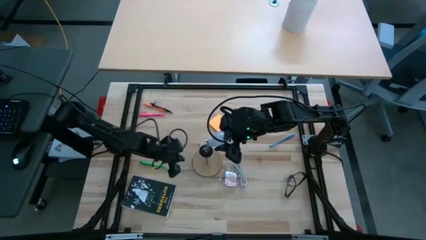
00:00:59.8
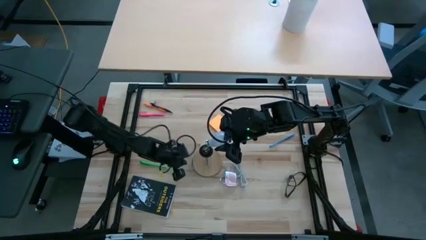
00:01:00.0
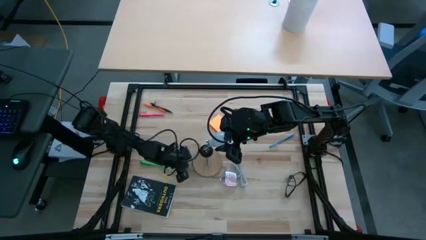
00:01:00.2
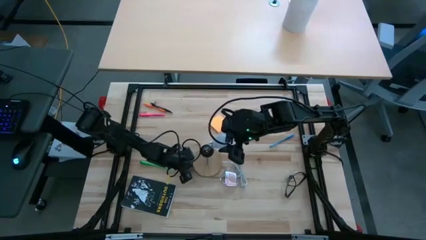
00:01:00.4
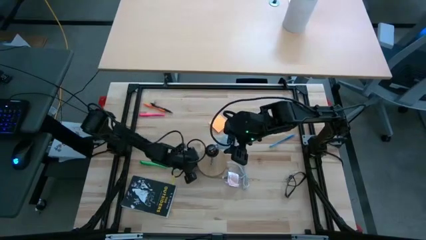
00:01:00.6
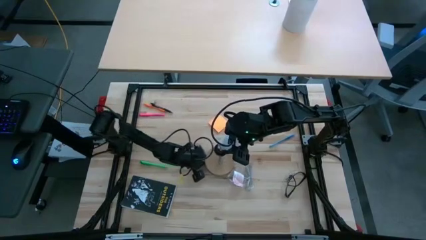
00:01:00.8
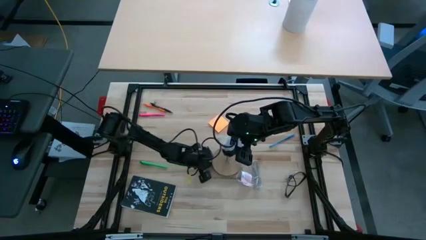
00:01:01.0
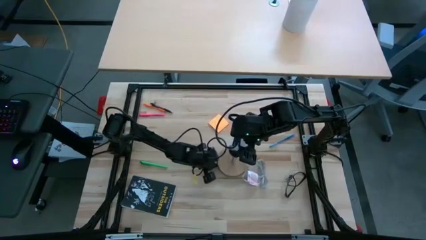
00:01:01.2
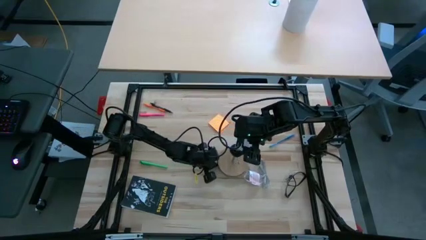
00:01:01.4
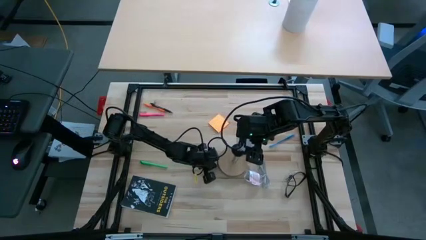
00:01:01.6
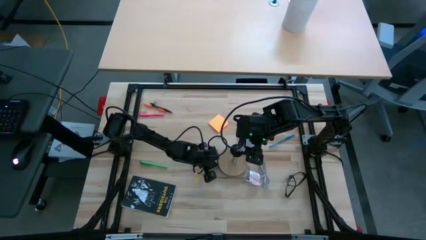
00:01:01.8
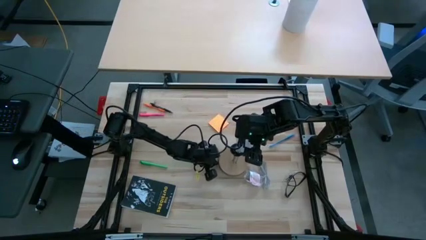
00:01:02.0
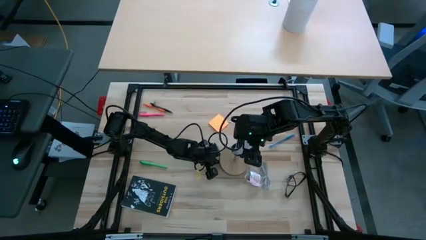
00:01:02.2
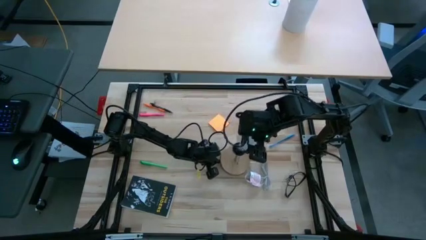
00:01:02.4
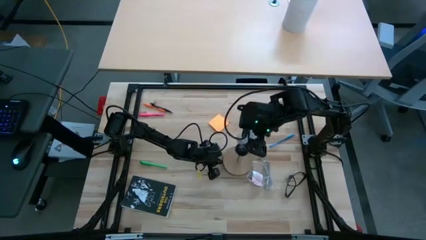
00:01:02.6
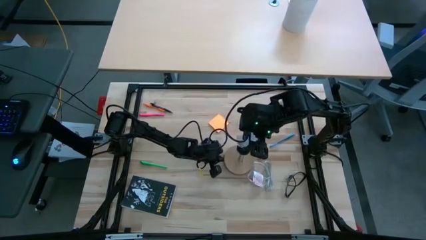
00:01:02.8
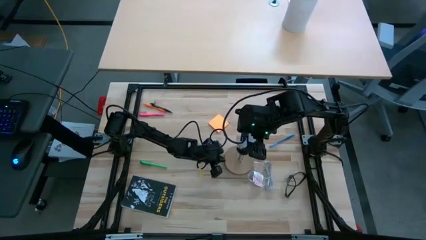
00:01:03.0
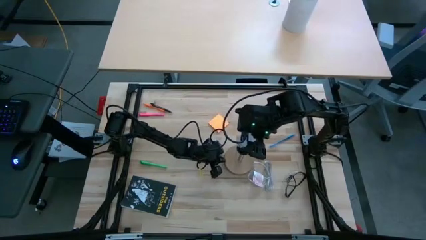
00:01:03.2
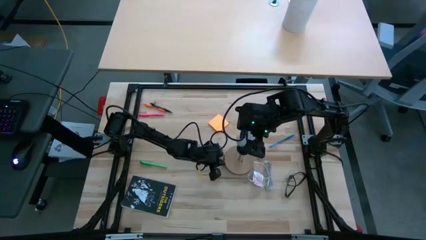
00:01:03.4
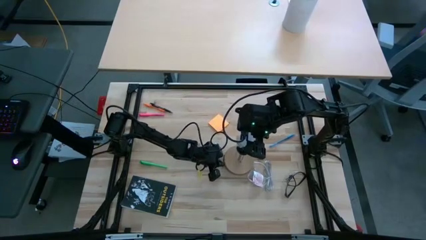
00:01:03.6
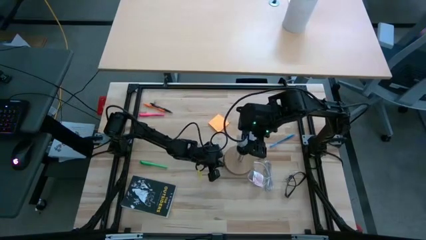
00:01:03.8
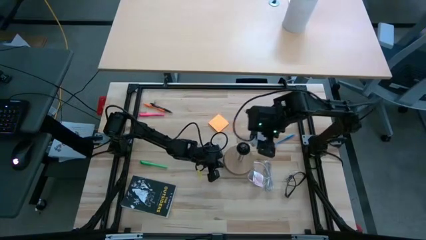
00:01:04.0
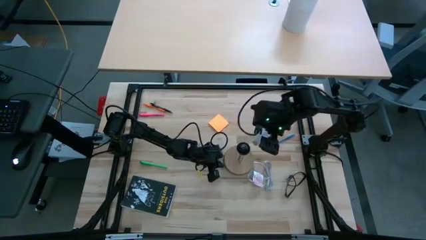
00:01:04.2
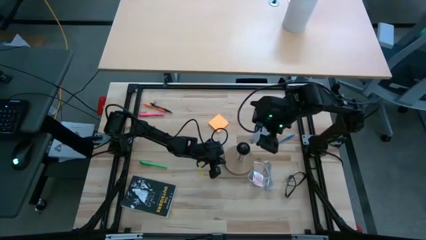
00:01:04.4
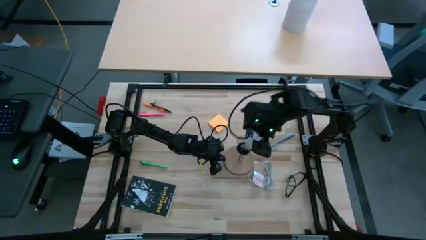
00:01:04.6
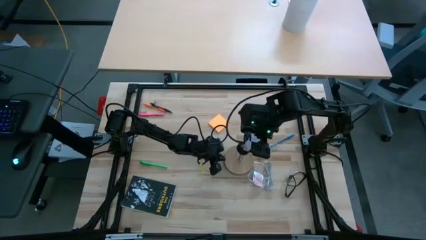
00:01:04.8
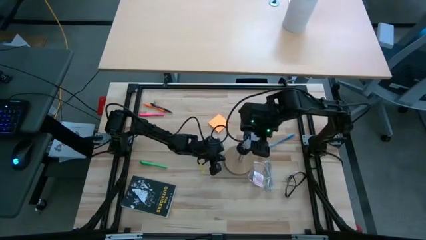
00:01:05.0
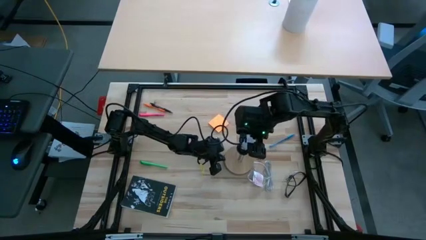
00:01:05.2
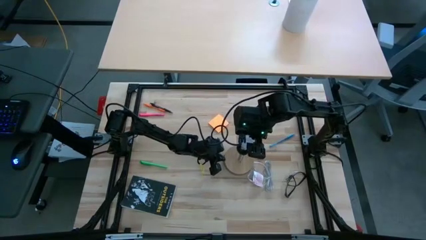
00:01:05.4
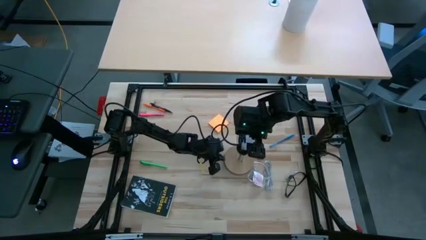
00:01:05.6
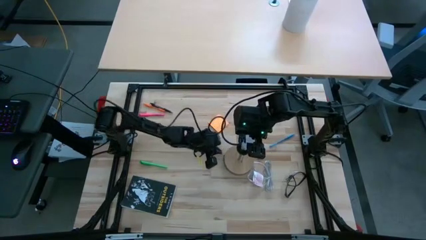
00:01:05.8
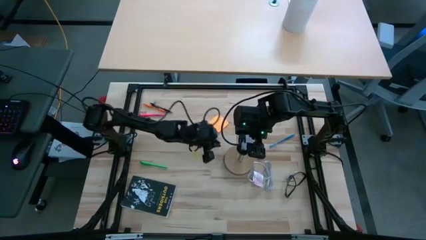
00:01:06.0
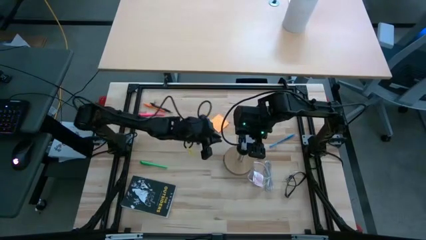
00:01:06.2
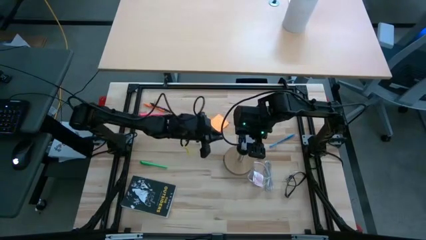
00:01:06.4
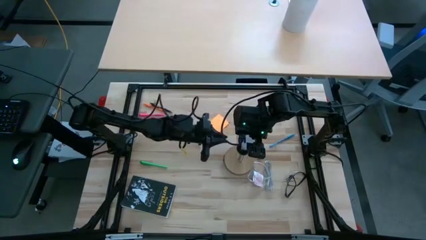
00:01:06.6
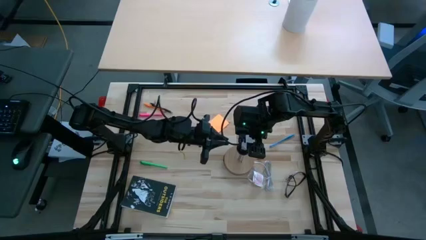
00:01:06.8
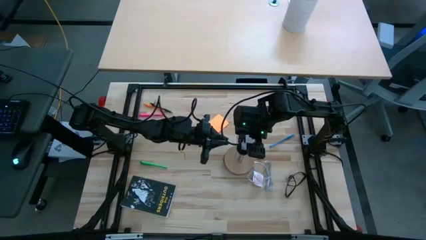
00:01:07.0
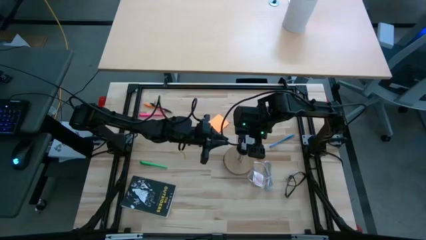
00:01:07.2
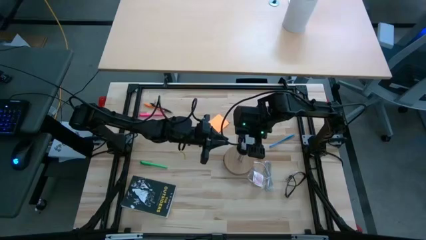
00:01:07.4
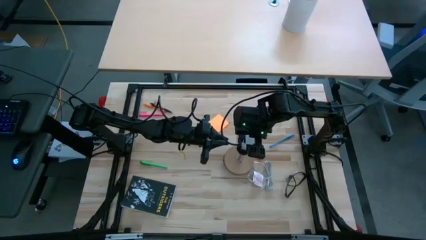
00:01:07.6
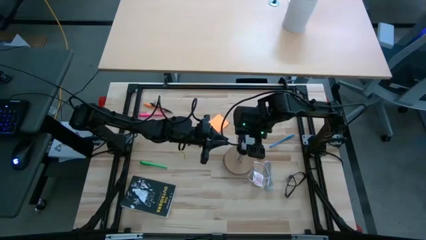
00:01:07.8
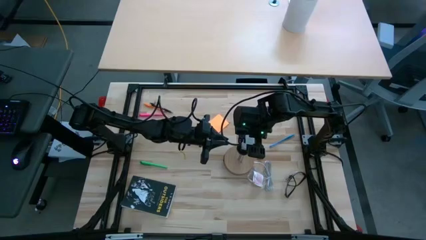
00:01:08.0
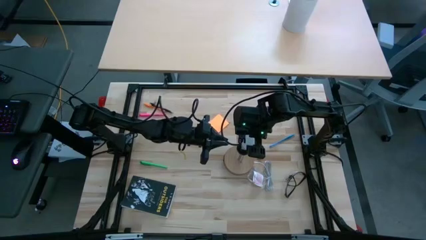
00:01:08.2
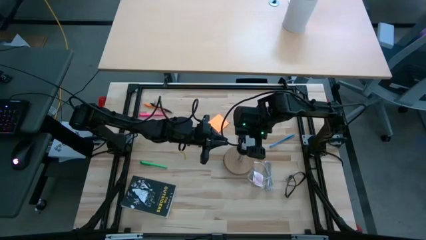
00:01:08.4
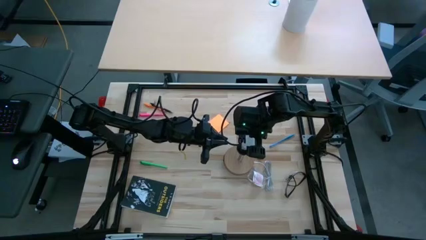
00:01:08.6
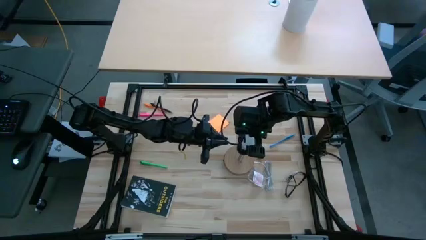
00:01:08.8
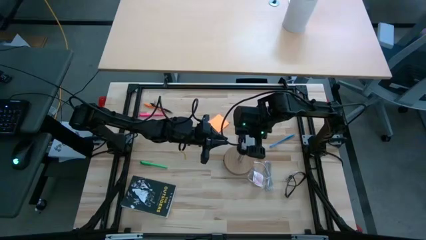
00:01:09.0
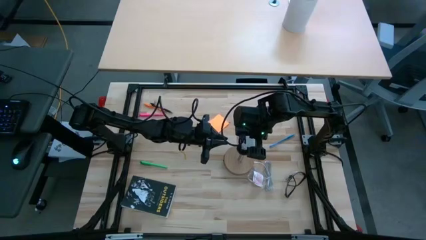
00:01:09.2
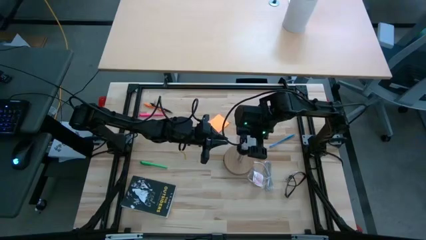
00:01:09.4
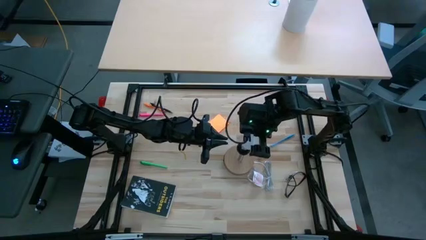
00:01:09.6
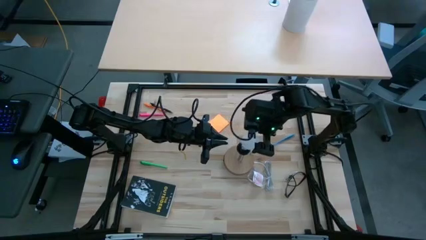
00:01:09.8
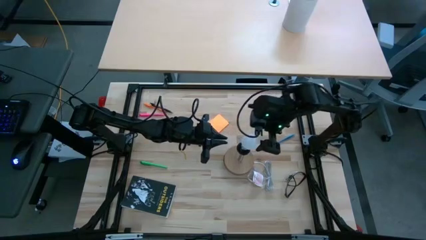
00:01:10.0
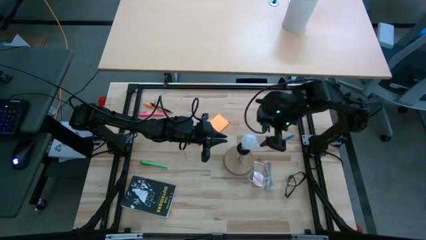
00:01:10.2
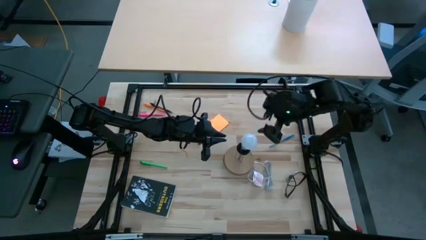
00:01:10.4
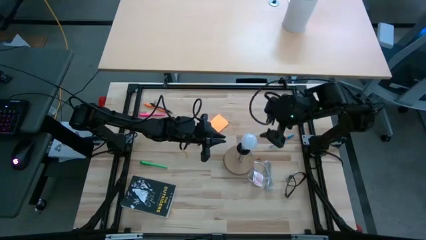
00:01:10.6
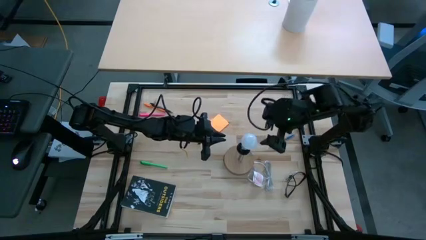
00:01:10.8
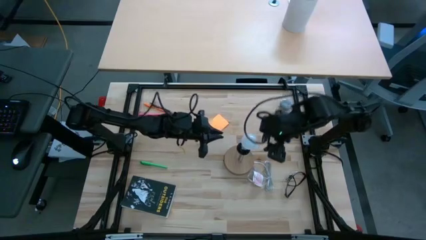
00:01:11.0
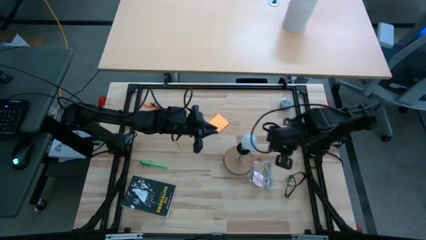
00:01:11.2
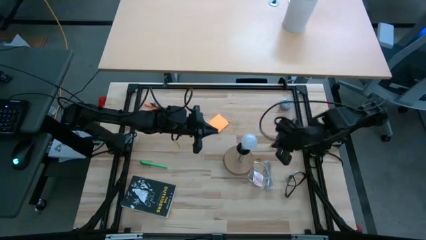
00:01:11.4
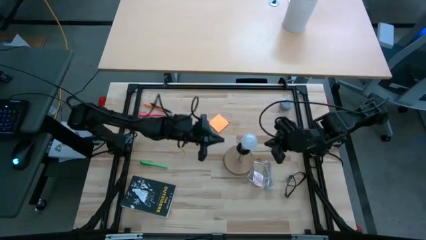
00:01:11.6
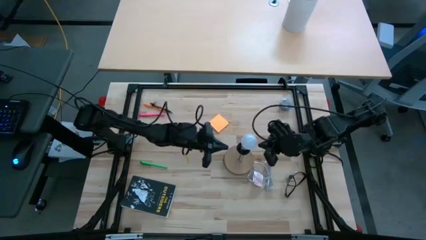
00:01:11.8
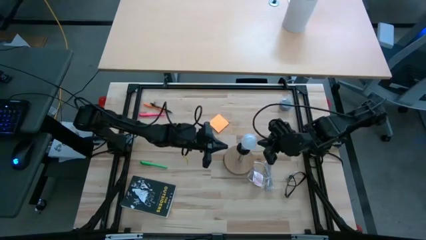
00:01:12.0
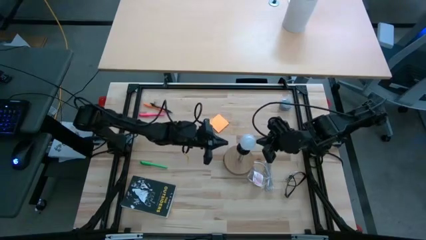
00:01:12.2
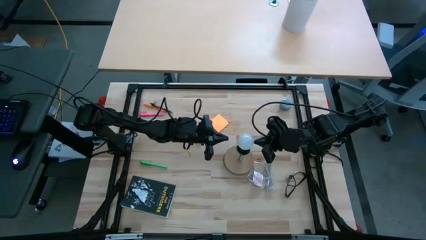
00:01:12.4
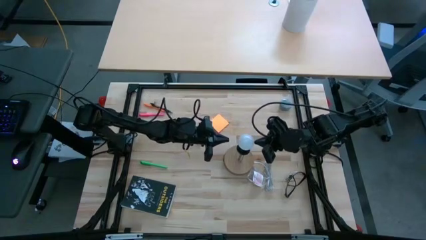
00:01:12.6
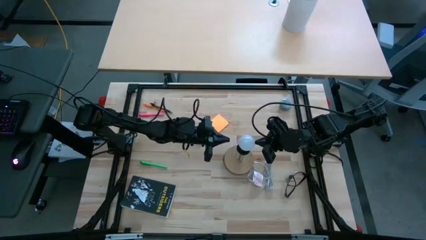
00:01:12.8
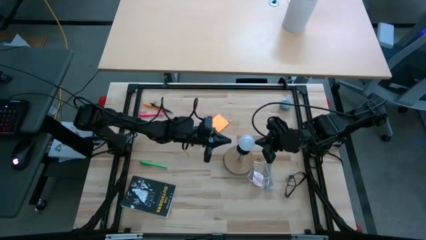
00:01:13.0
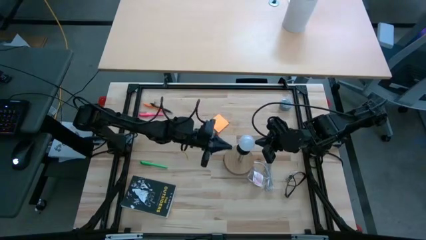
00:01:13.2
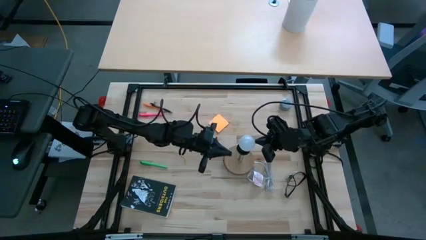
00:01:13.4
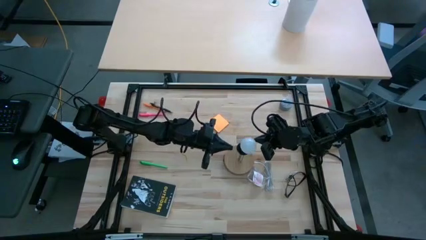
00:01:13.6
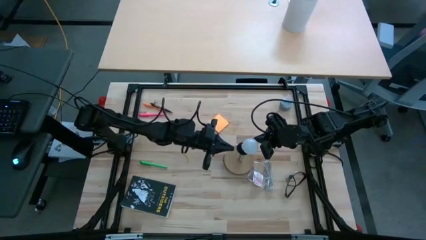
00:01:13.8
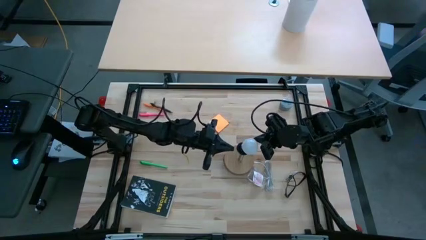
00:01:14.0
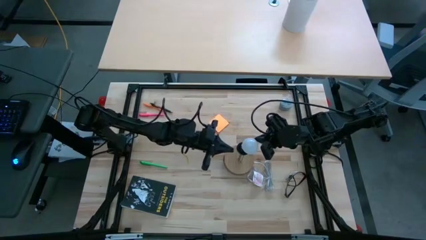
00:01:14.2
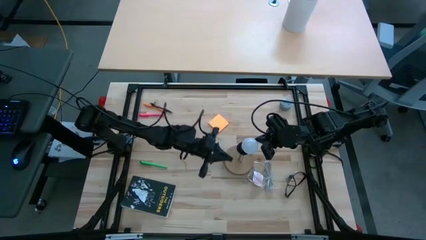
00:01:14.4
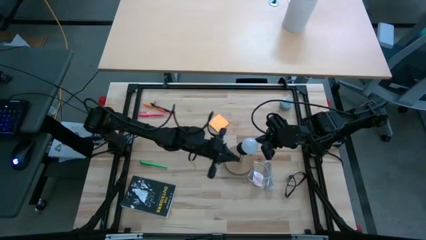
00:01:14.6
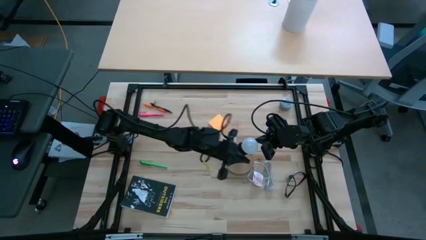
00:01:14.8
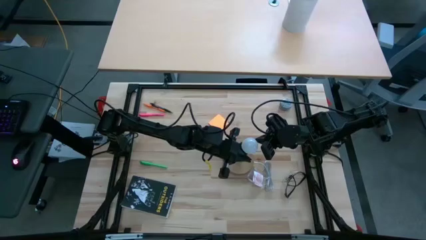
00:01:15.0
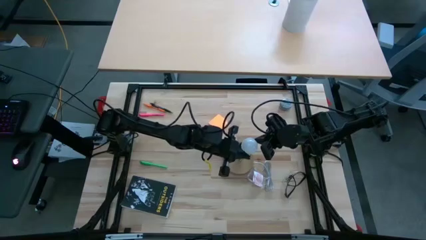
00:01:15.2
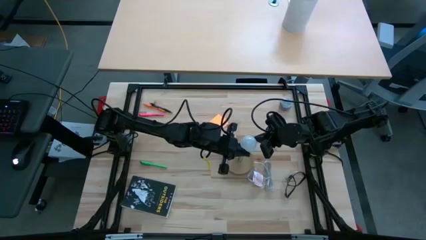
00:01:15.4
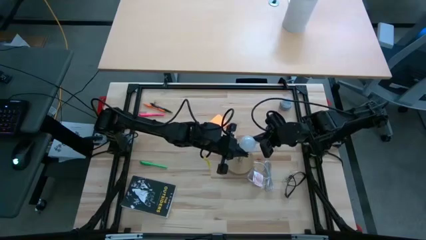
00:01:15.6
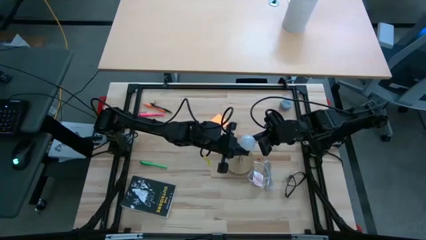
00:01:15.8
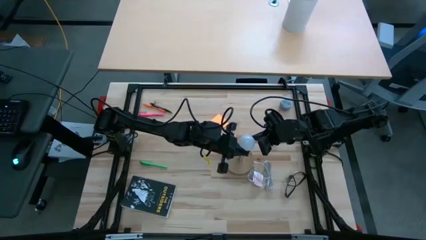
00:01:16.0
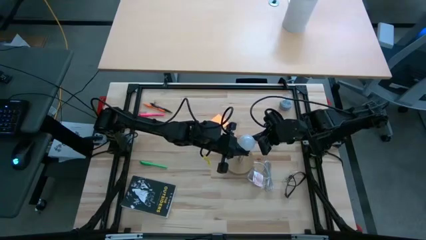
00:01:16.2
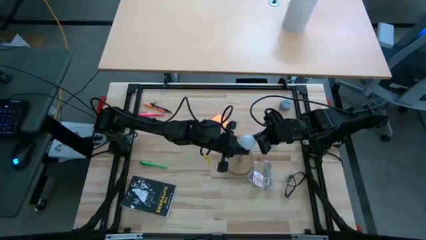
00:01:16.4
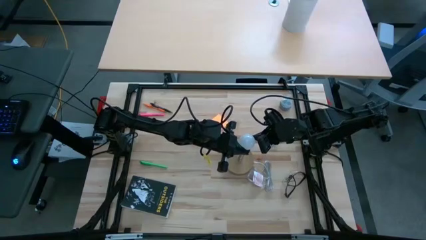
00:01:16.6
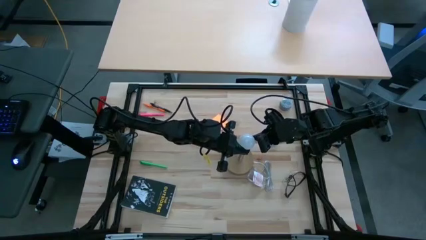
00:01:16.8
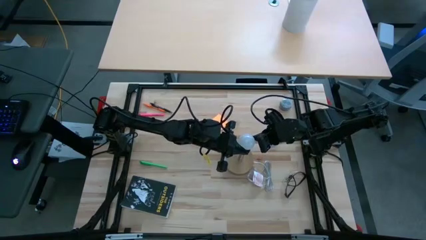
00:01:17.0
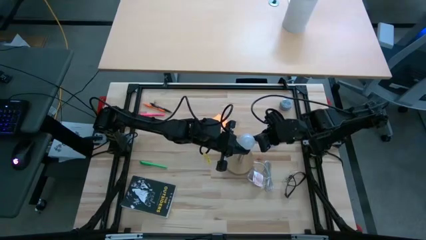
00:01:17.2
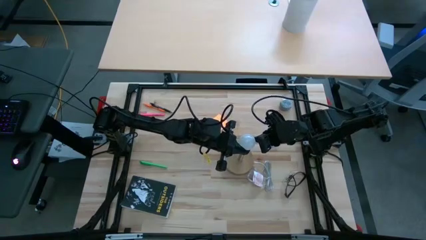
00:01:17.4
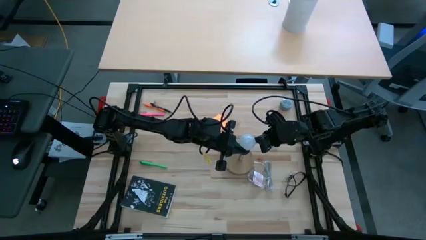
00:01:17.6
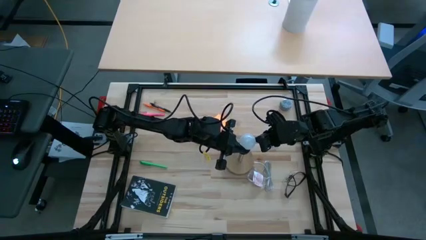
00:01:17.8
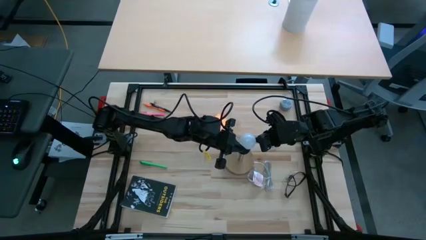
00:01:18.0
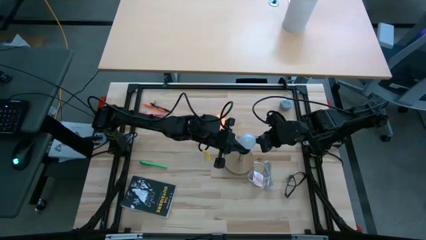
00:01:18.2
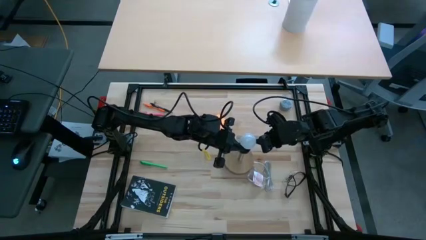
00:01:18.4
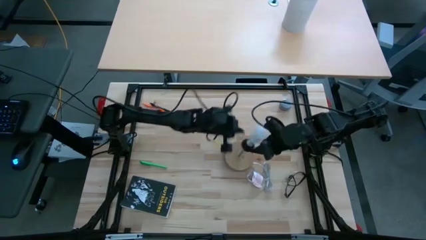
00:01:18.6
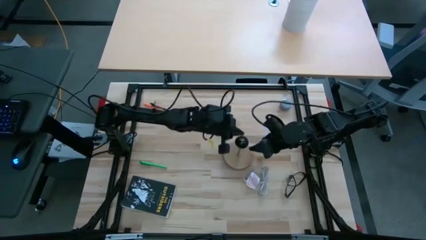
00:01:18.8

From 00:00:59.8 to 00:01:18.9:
Task: Screw lightbulb
Insert the white lightbulb into the lamp
